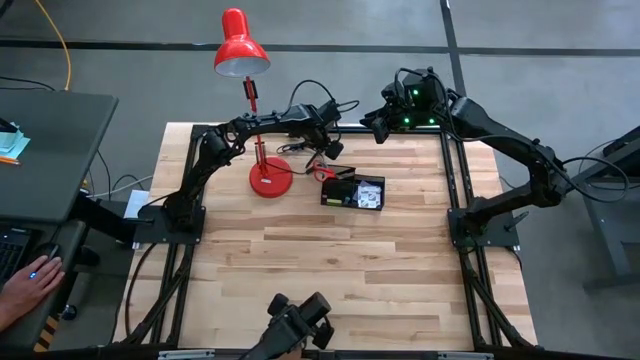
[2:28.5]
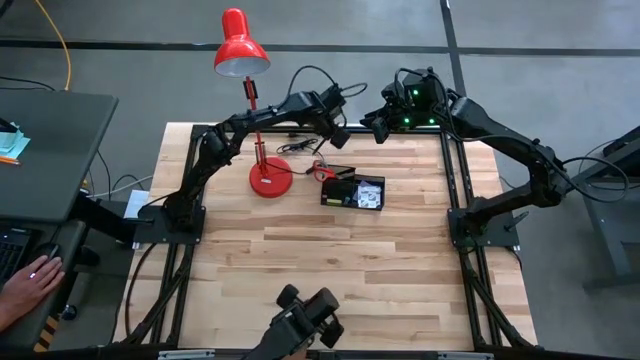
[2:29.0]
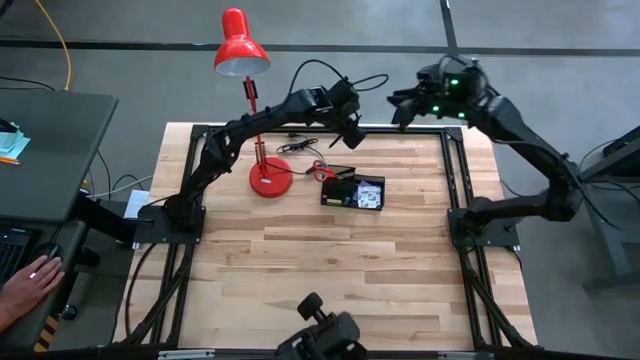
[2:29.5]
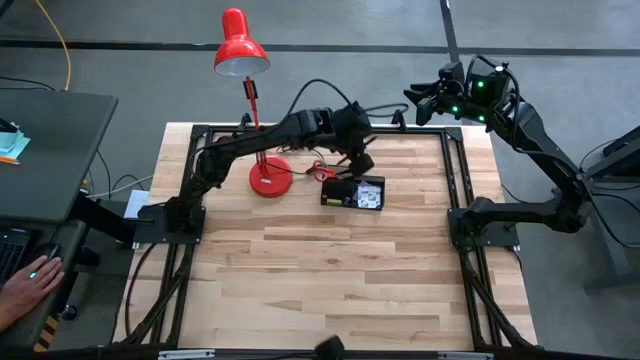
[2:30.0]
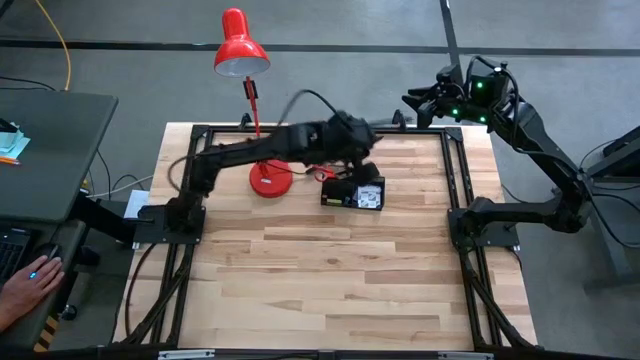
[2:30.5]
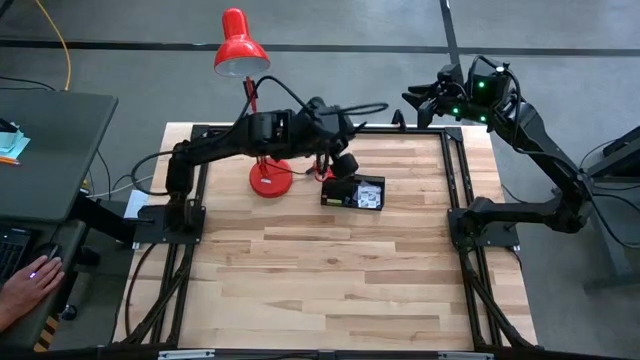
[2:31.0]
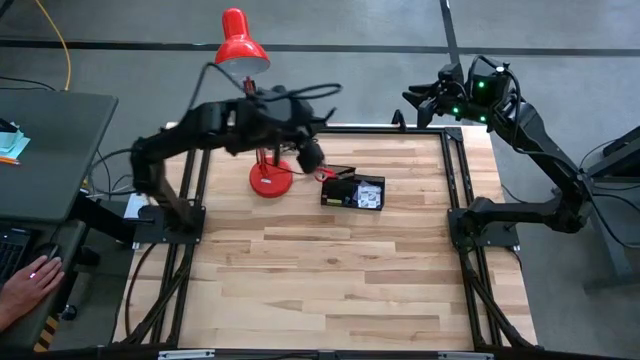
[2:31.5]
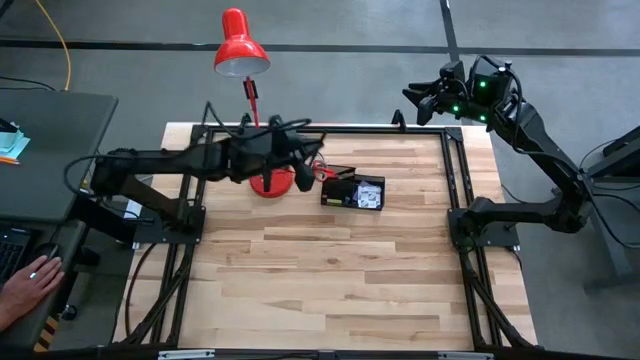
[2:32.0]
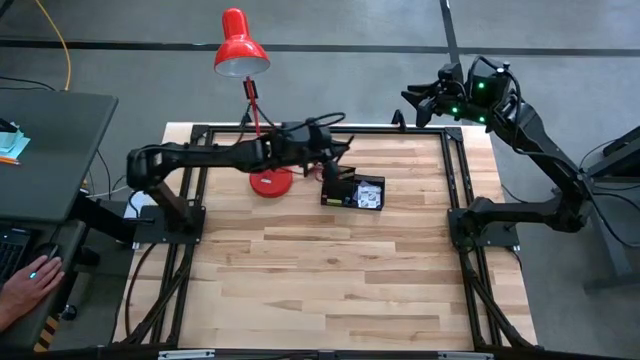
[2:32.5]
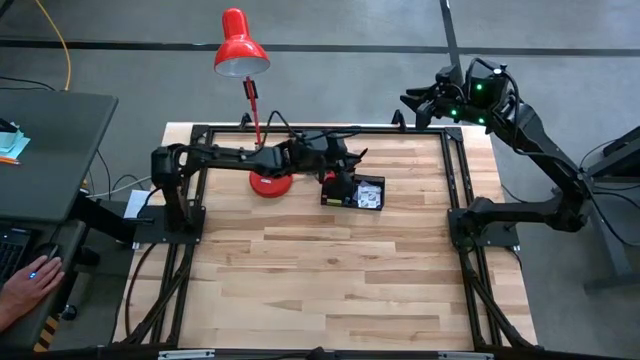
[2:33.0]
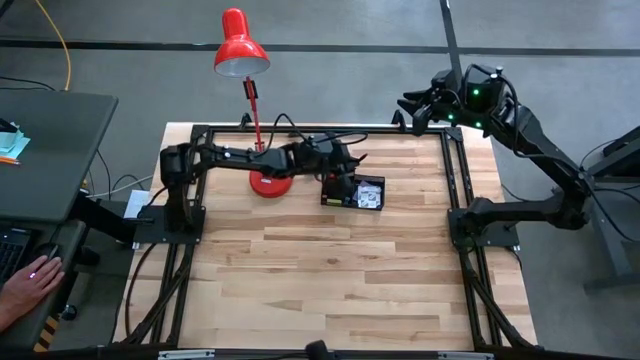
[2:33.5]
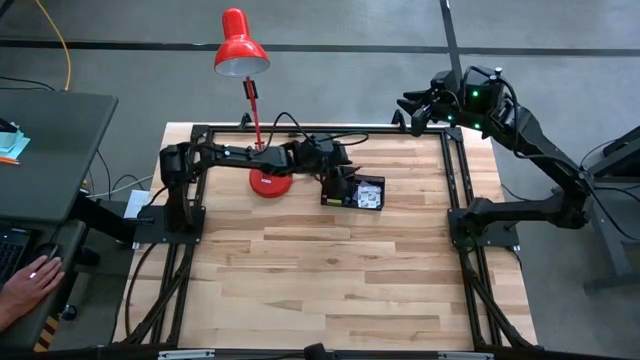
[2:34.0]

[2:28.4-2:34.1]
Task: Pick and place office supplies into organizer
Put the pen into the desk organizer

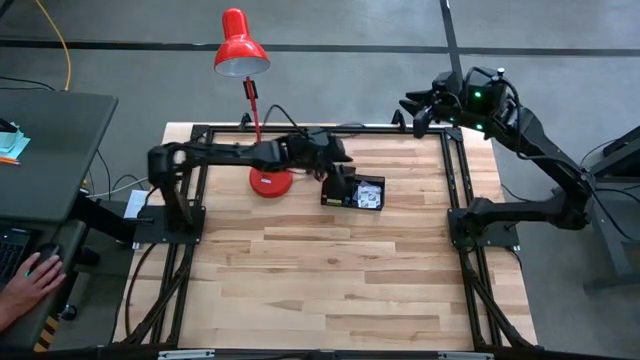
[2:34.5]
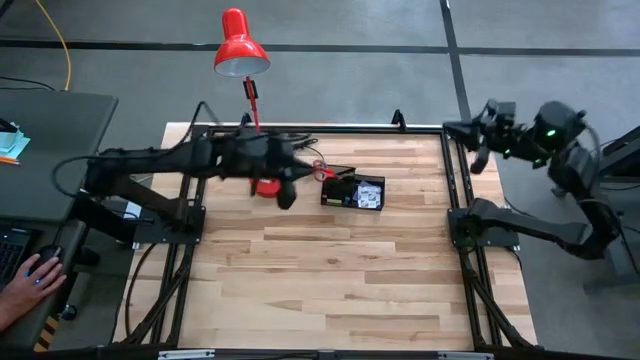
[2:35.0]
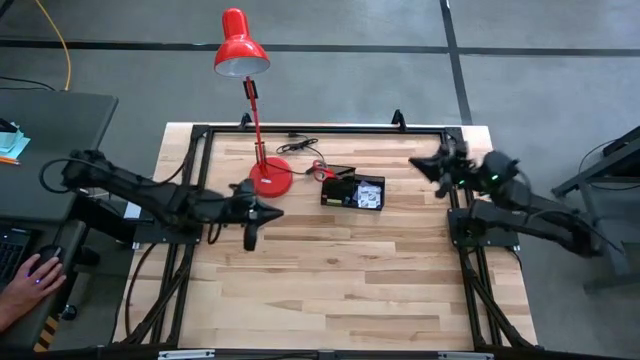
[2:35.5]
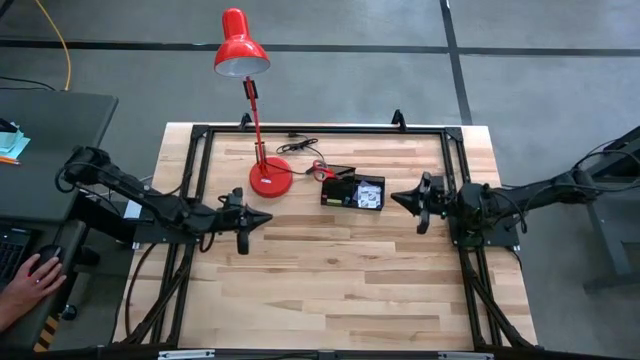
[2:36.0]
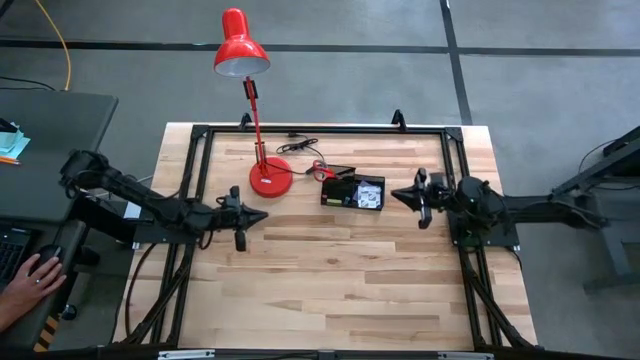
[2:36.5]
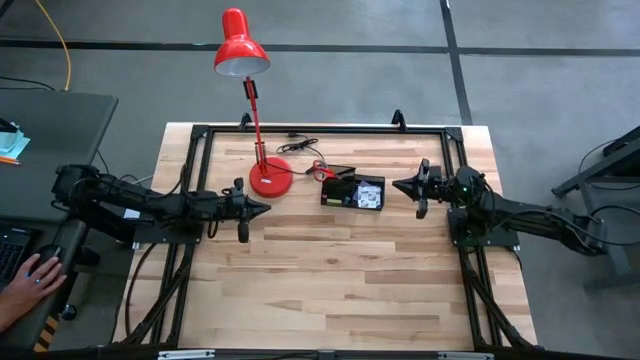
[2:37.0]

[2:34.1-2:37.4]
Return to Home Position

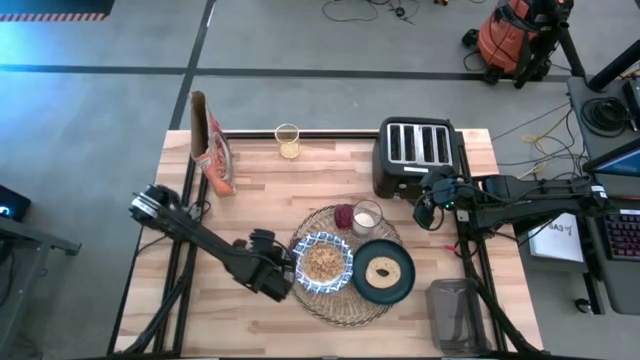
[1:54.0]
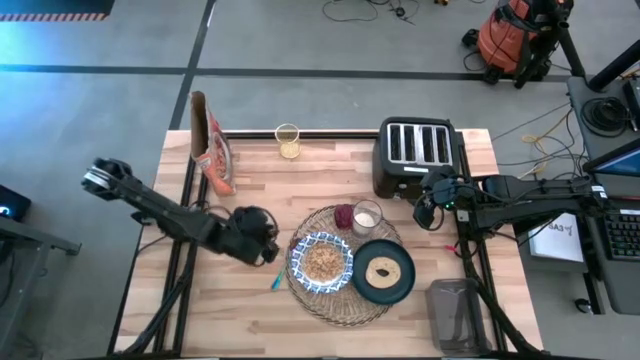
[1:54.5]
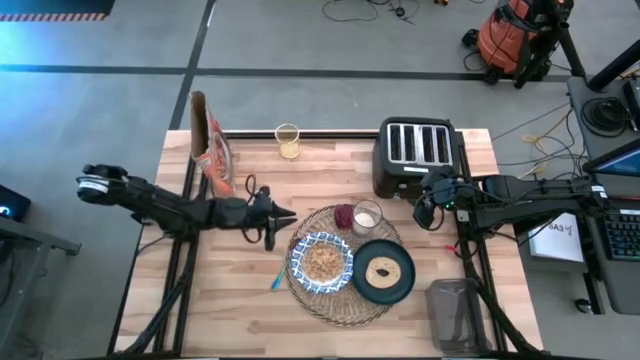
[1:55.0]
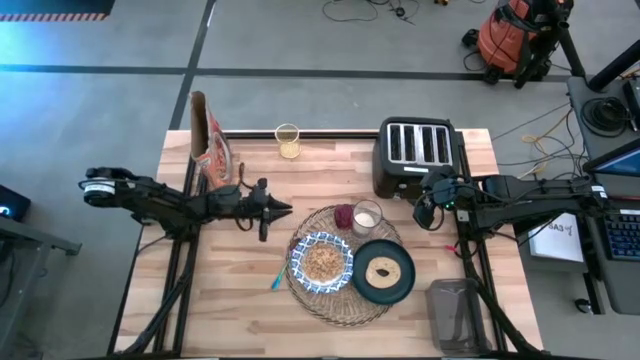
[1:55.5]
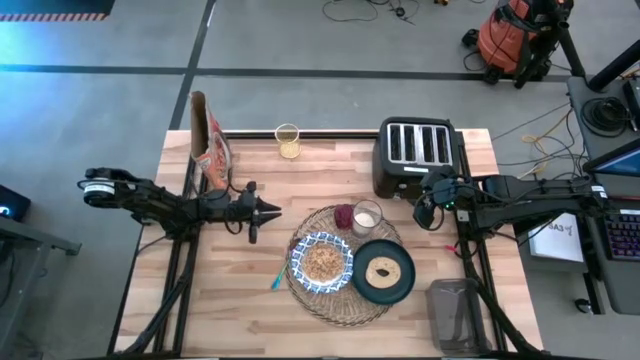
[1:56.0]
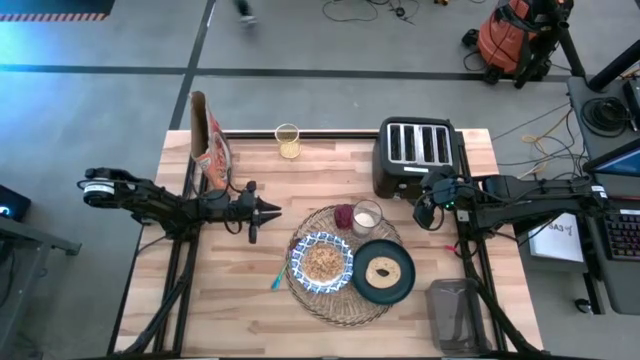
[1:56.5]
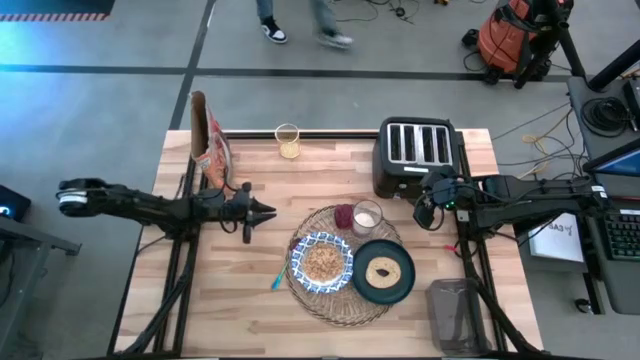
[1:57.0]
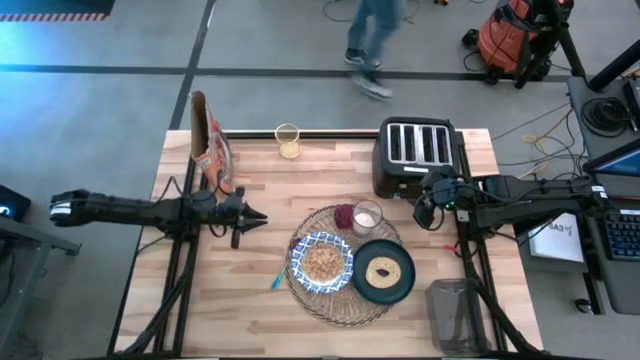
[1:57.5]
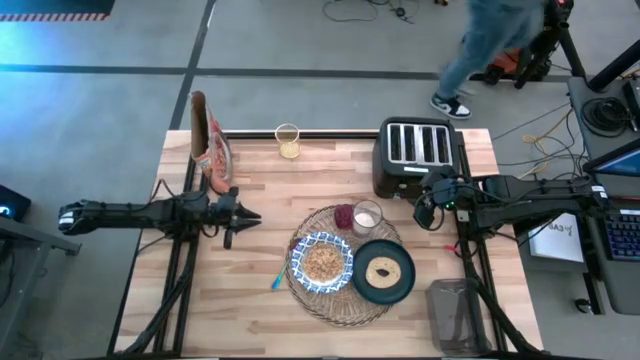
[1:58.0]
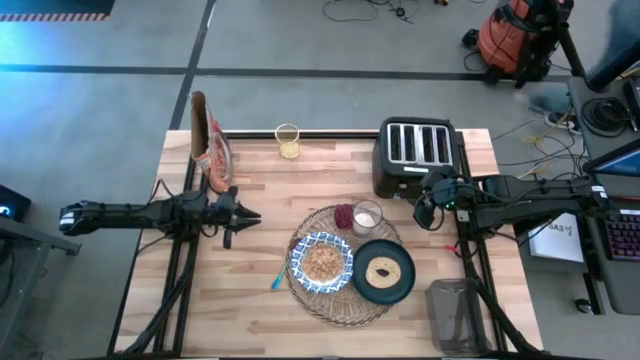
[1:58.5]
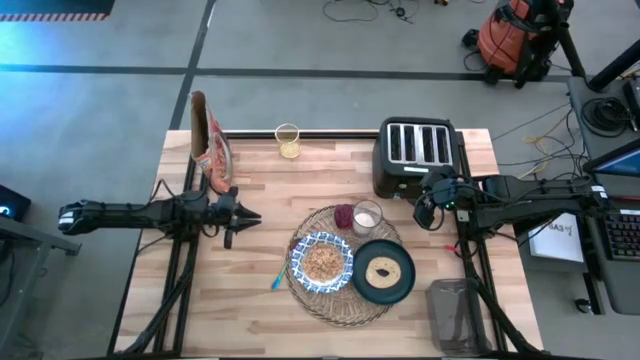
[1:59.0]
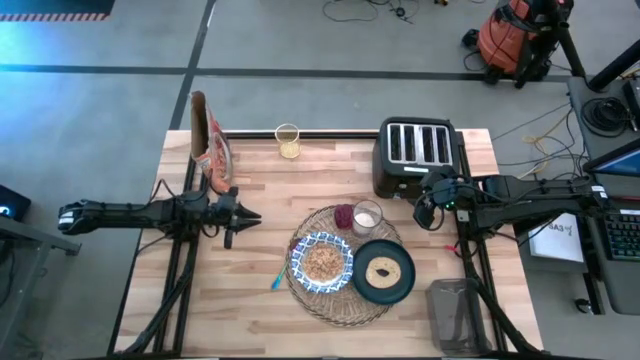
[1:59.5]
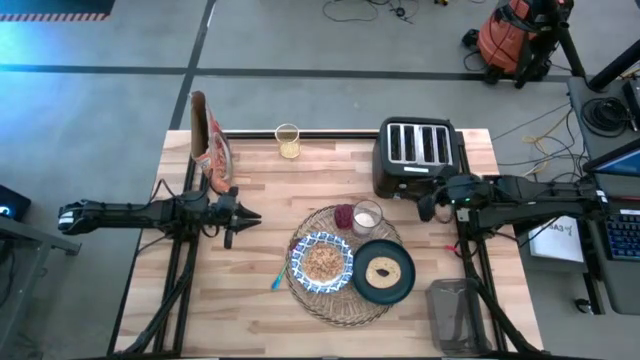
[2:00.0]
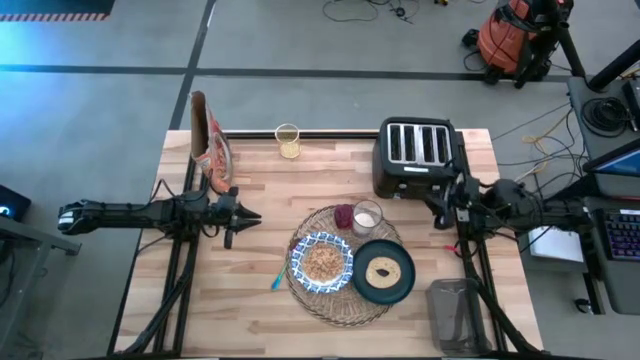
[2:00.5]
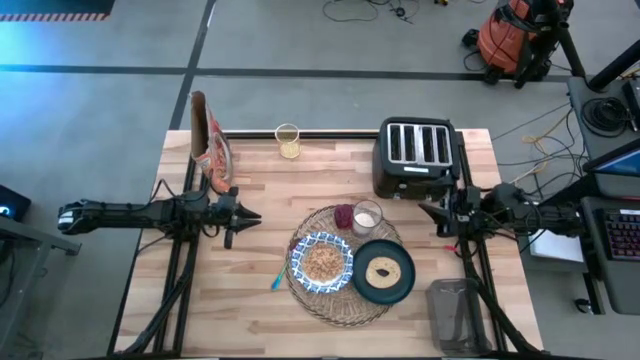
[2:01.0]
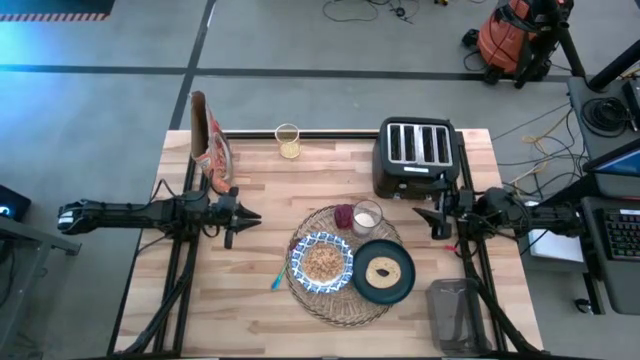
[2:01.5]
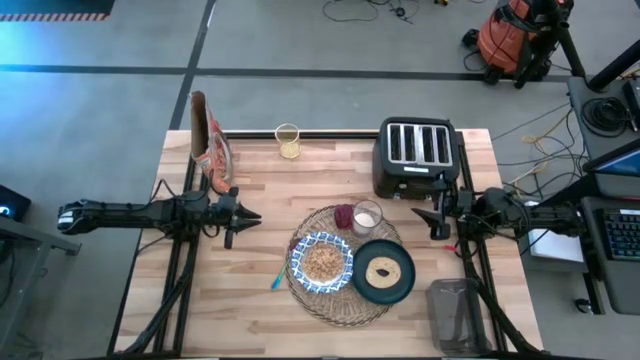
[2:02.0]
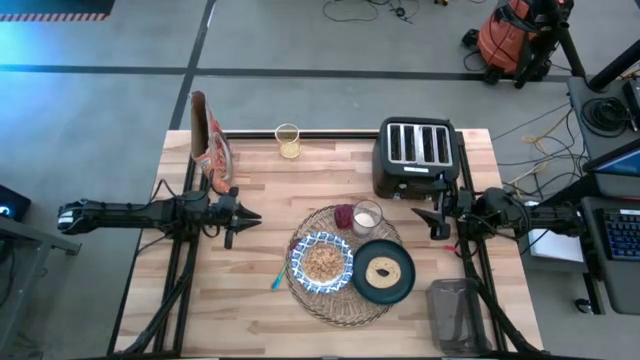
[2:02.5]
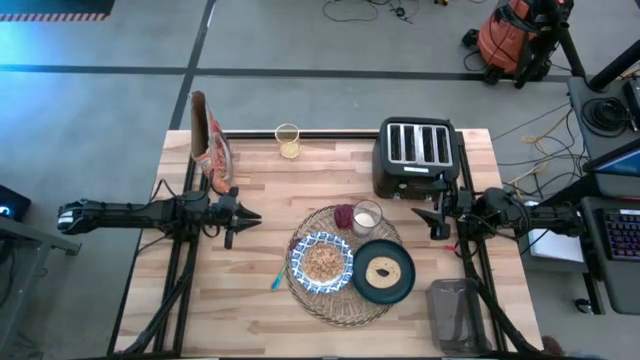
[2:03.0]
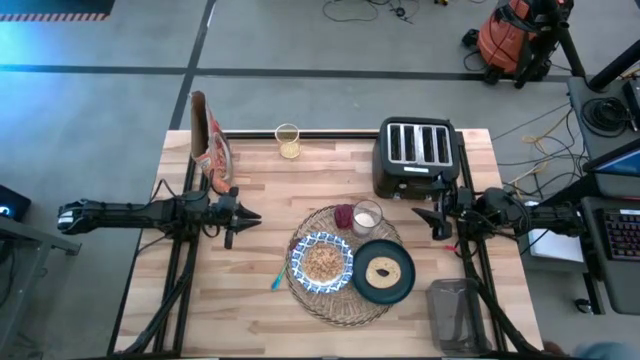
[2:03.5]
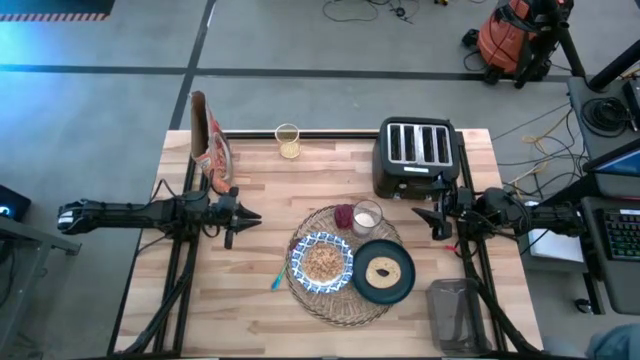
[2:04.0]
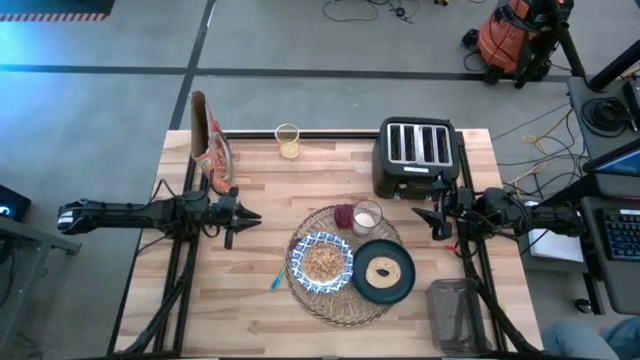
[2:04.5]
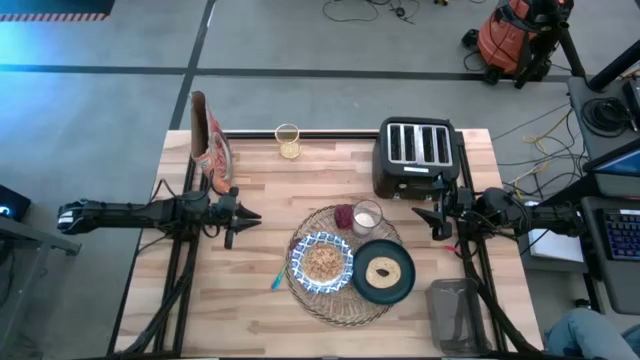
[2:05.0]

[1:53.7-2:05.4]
Task: Arrange a breakfast setting
Return to Home Position
